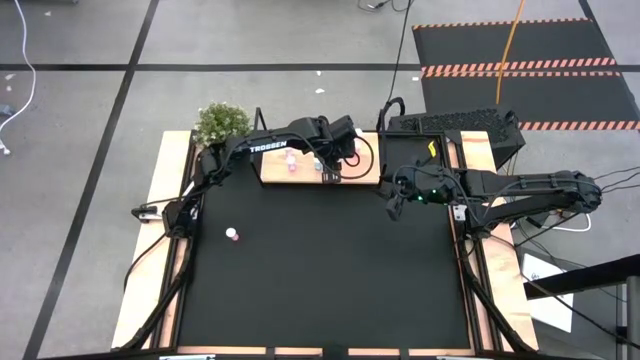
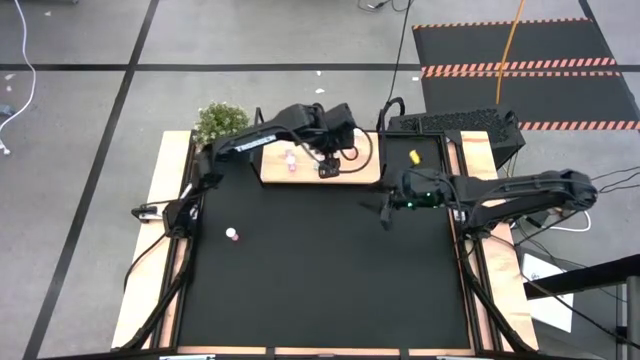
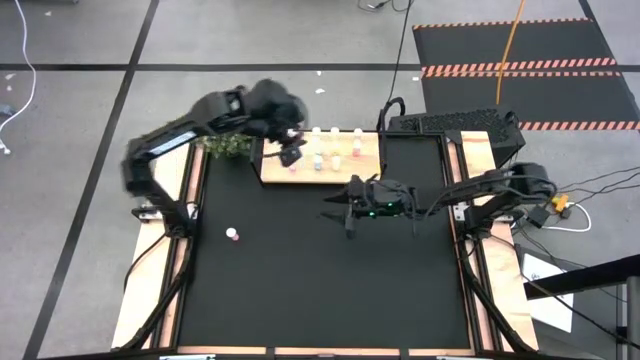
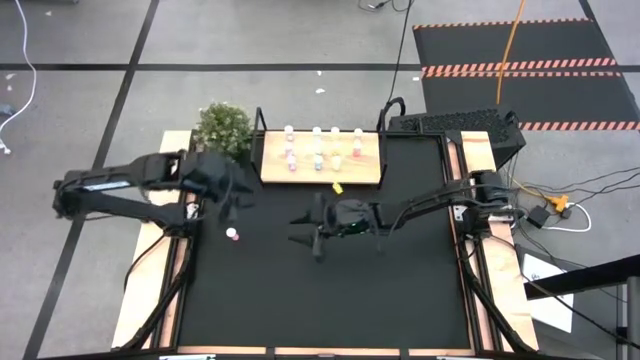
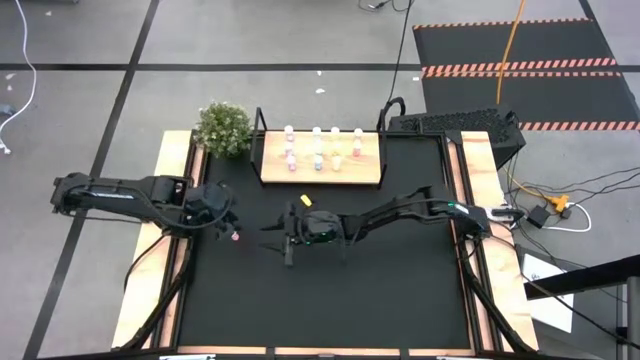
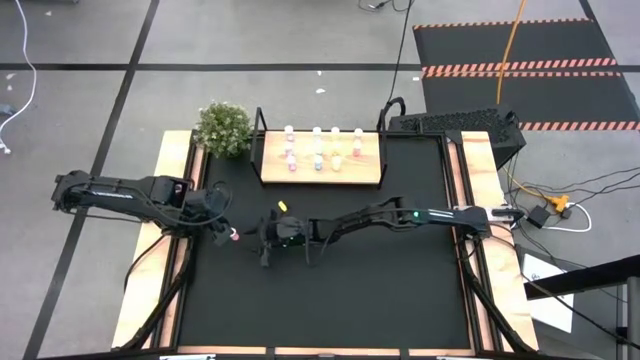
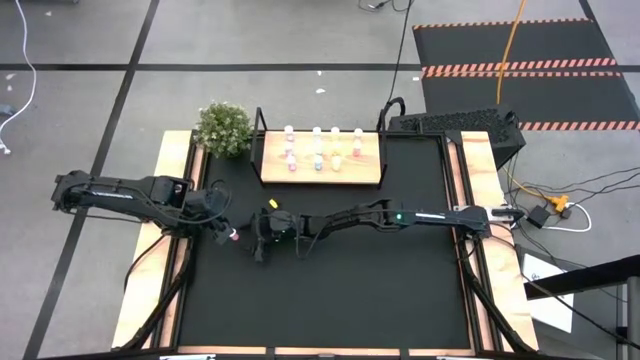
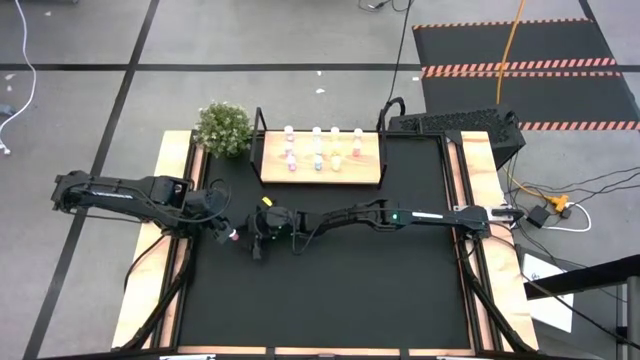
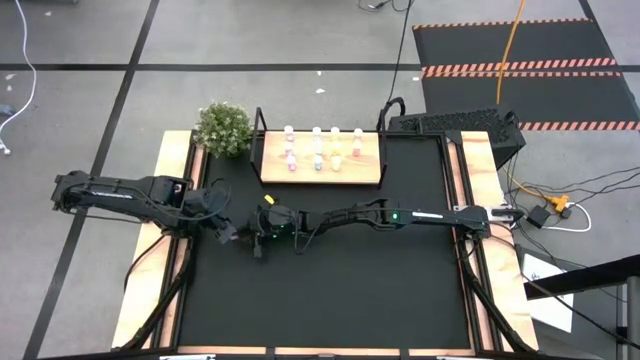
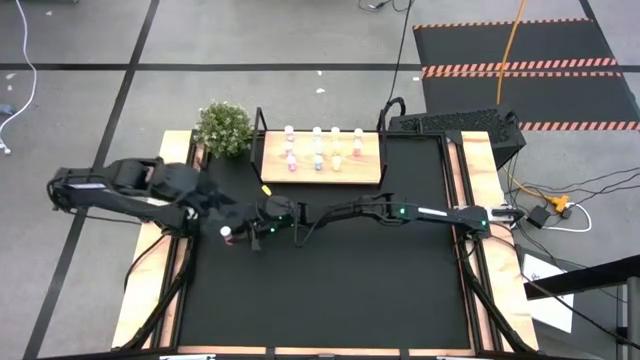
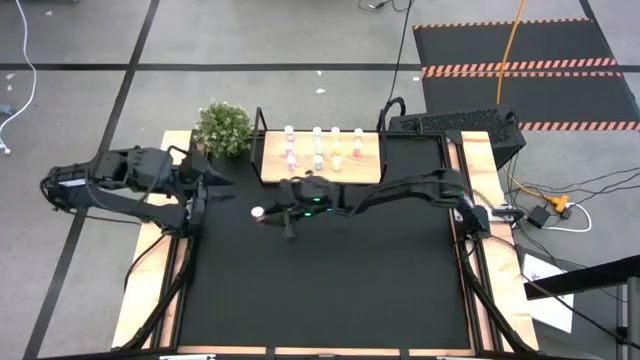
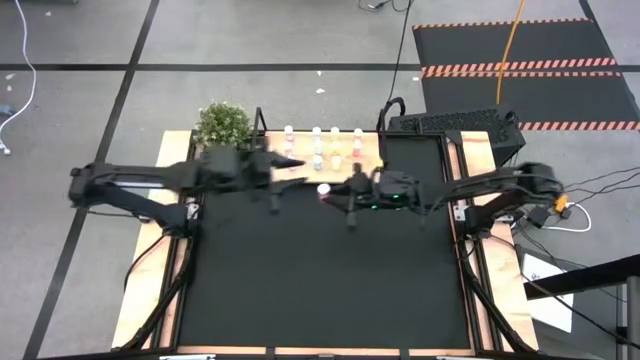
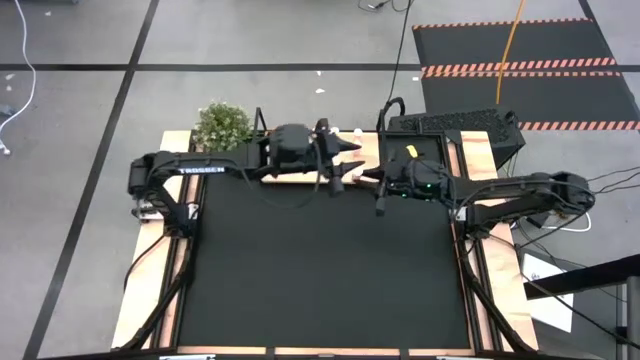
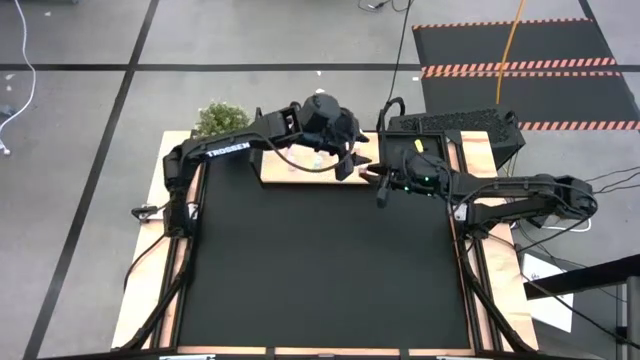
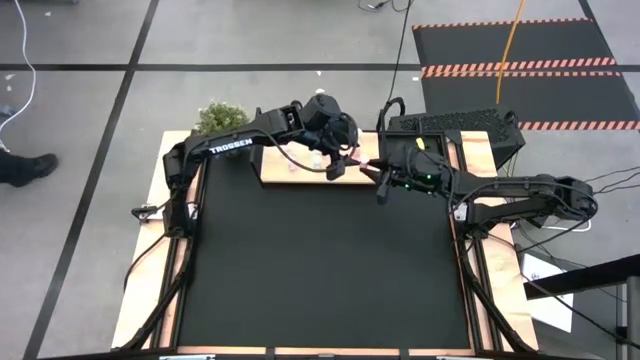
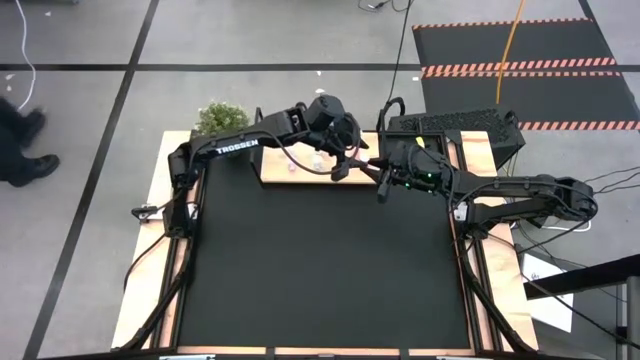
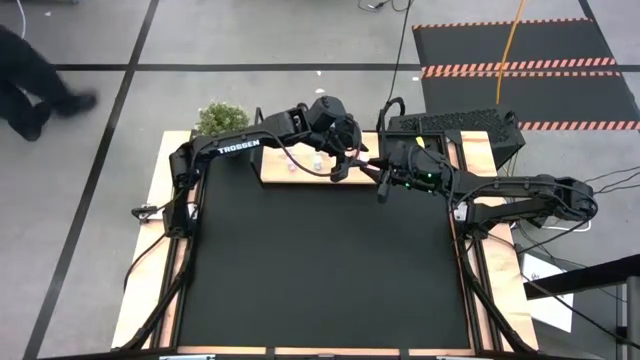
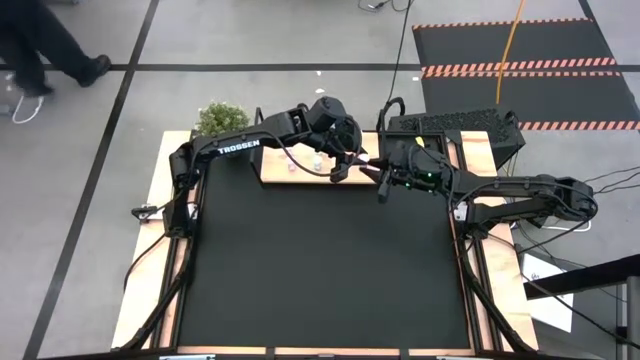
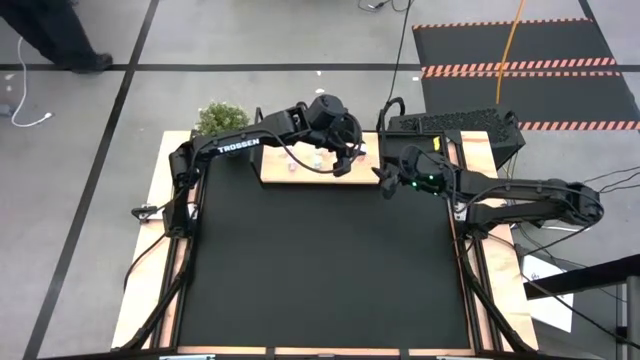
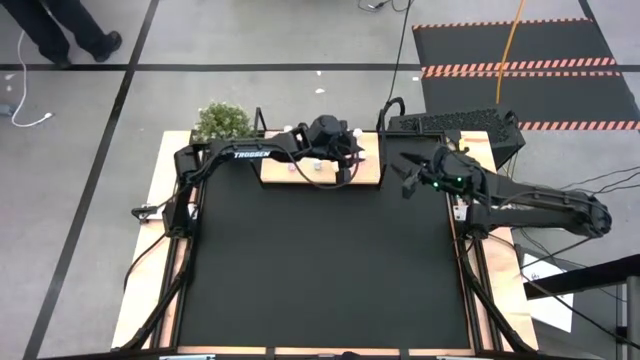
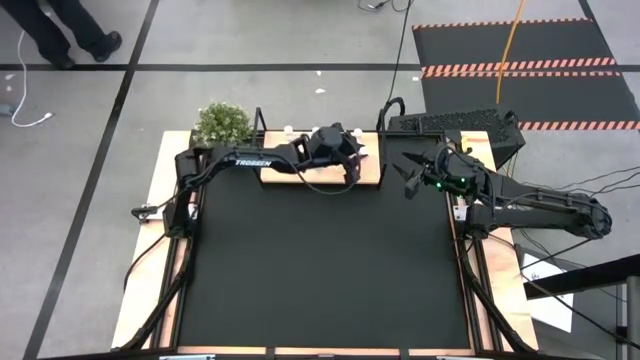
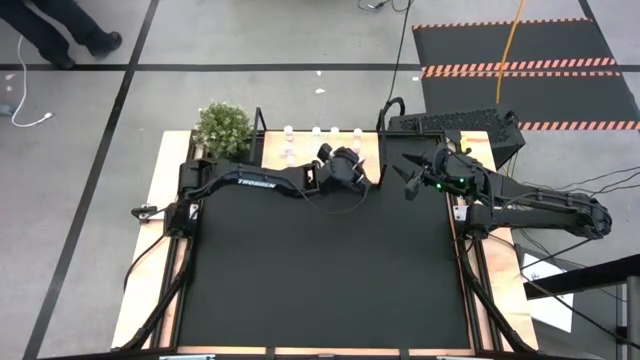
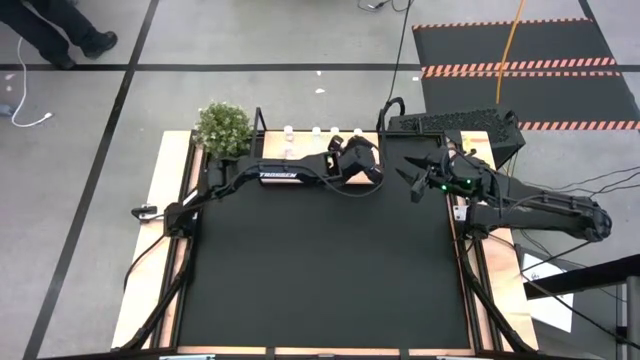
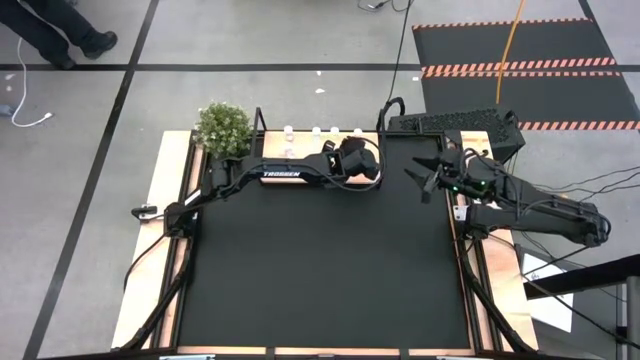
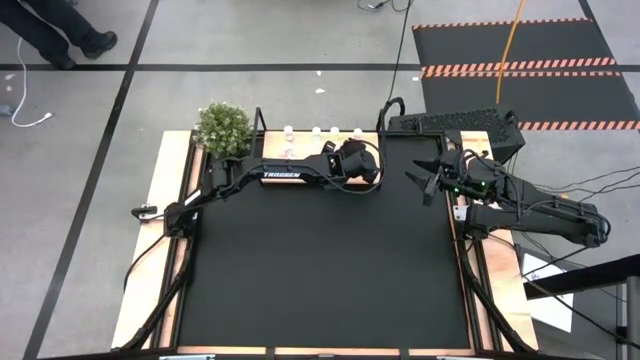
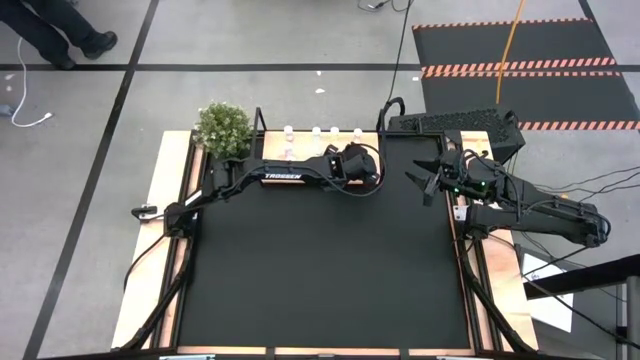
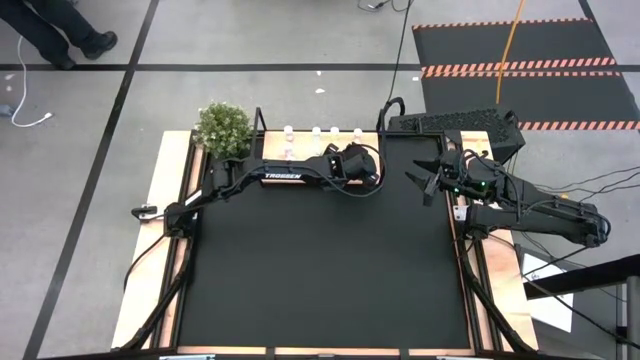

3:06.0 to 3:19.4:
Task: Pick and place medicine bottles onto shelf by color
Put the pink pill bottle on the shelf aligned with the other pink pill bottles

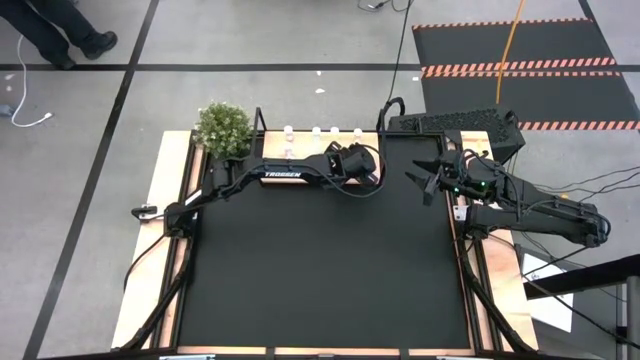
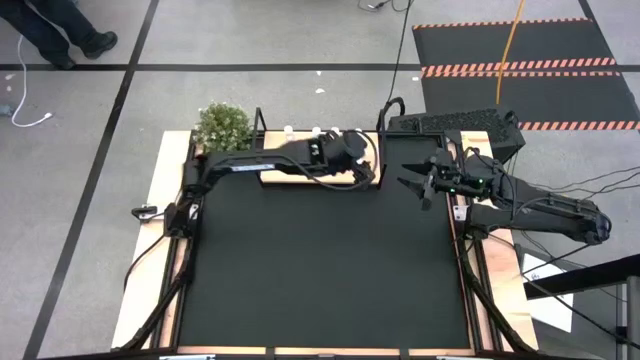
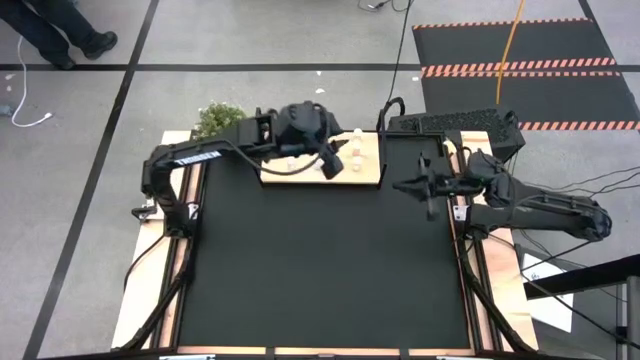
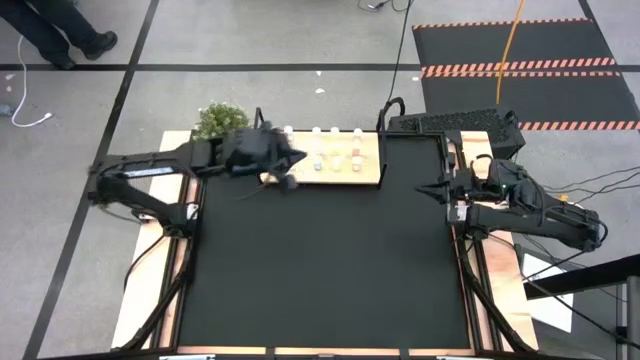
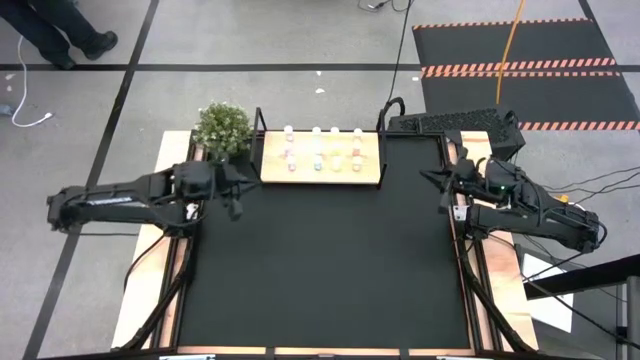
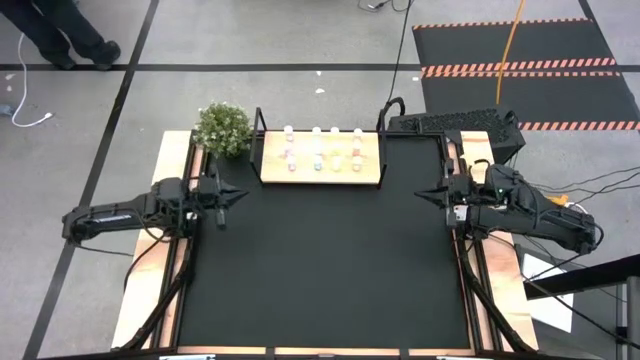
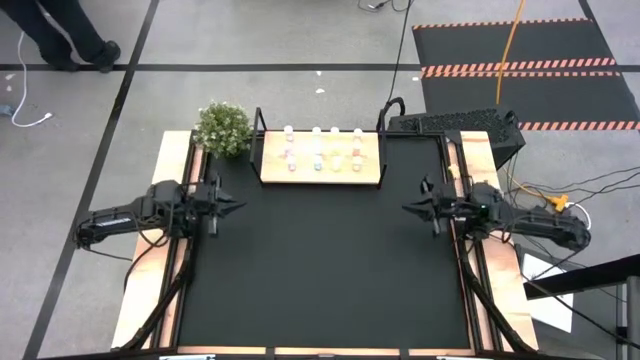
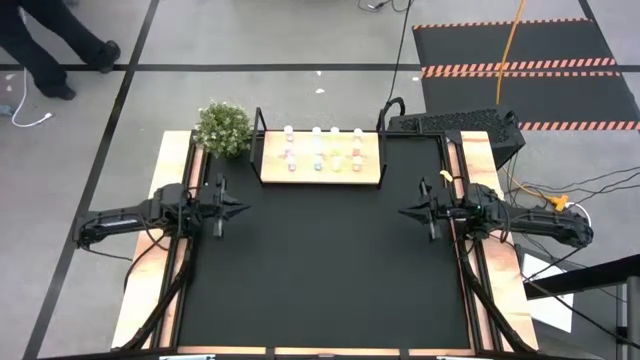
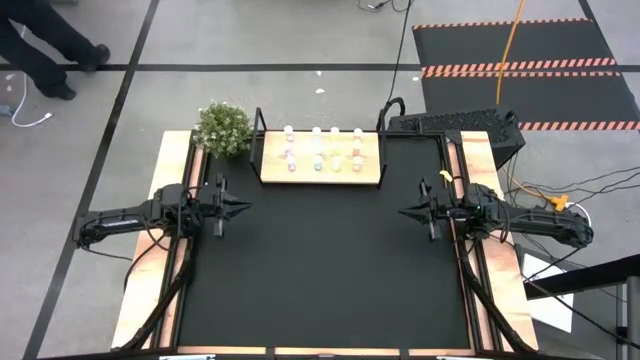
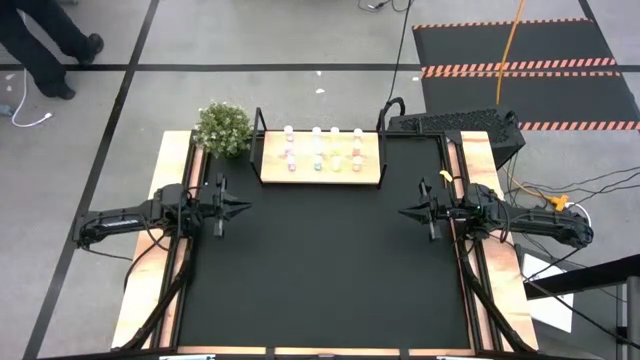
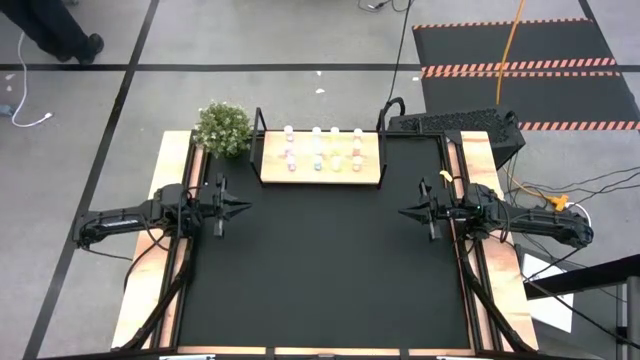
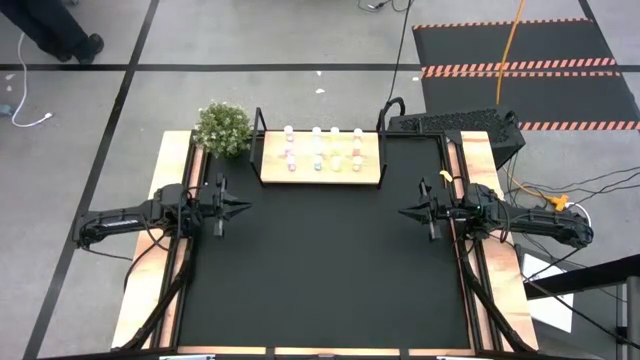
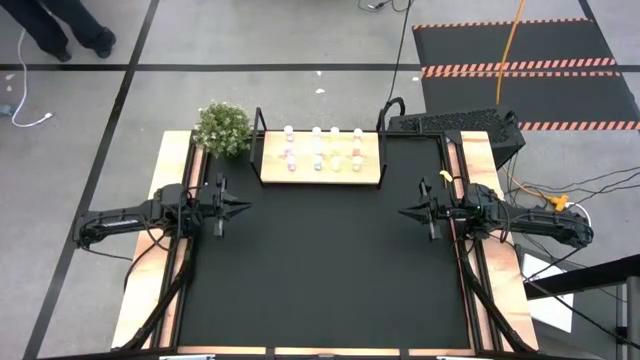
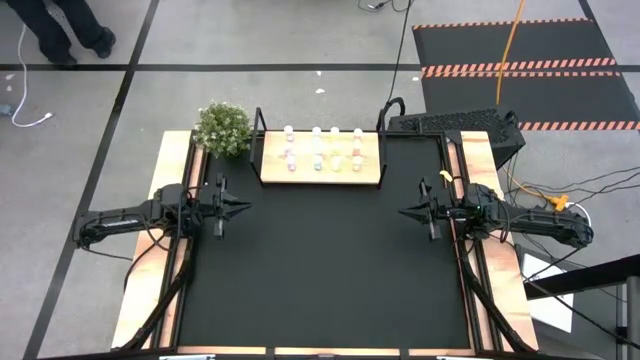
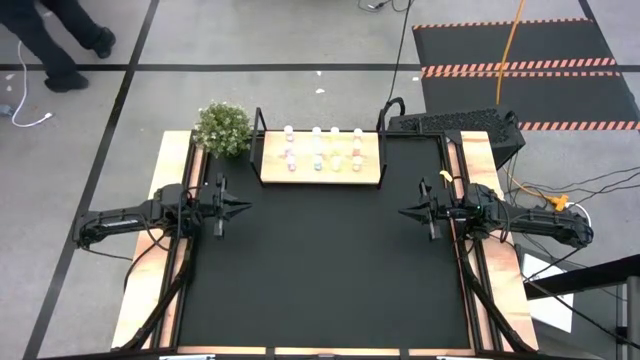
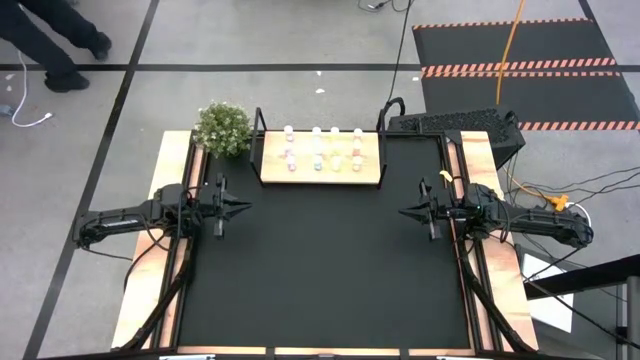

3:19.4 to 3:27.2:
Return to Home Position

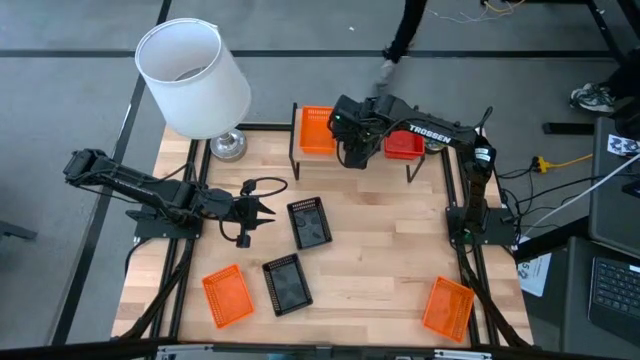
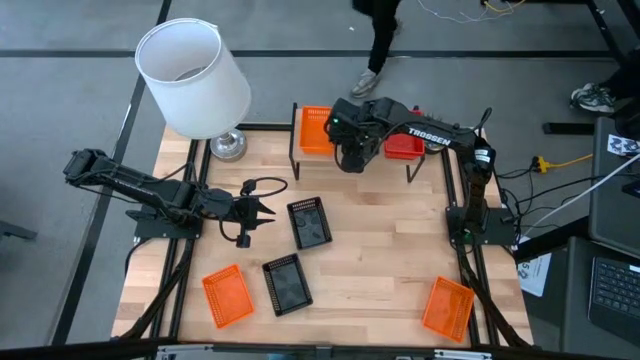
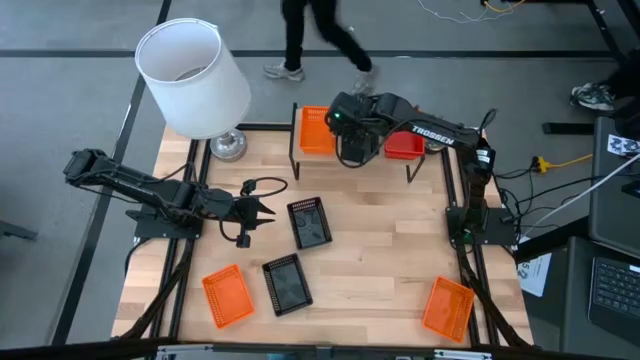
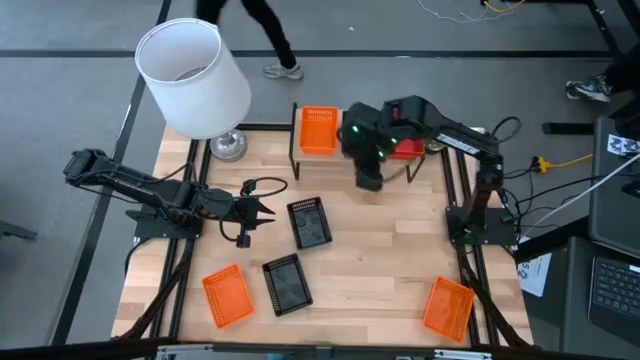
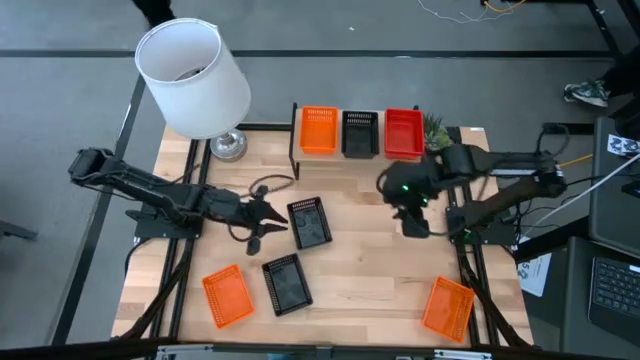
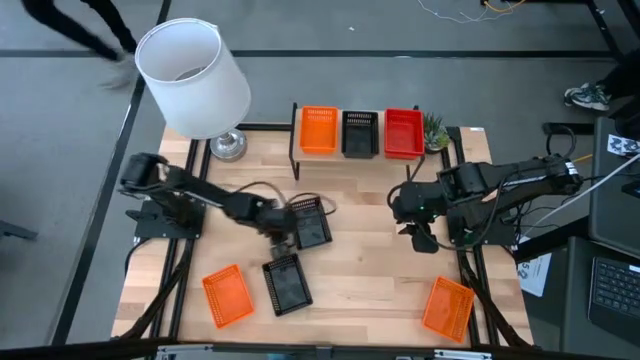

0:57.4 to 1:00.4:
Task: Stack baskets on shelf by color
Move the top black basket to the right of the table
